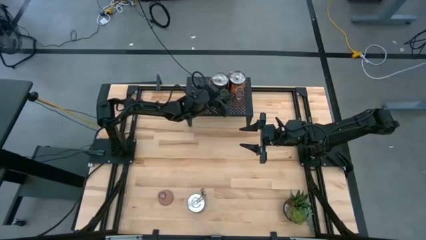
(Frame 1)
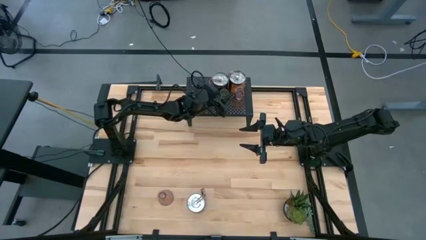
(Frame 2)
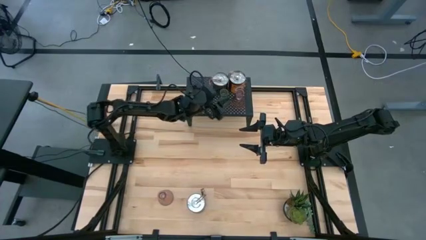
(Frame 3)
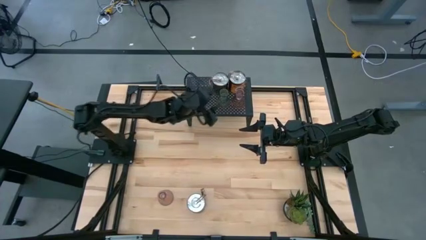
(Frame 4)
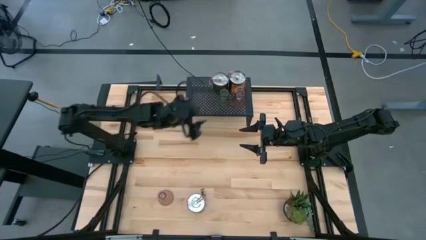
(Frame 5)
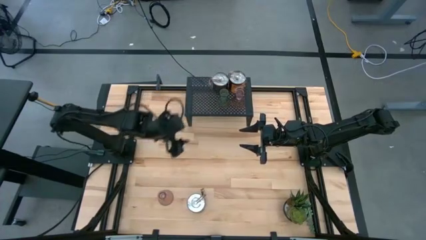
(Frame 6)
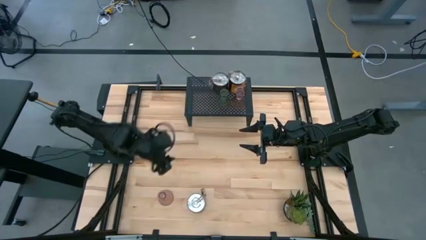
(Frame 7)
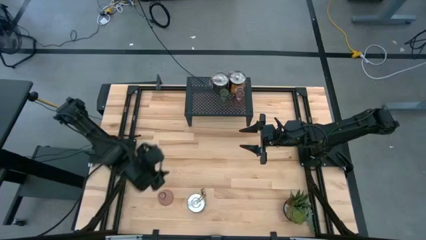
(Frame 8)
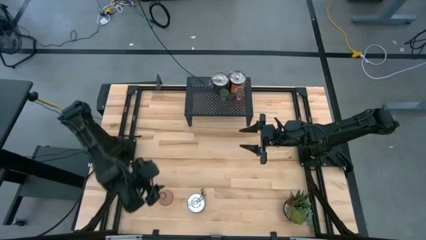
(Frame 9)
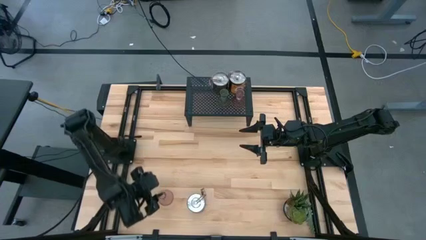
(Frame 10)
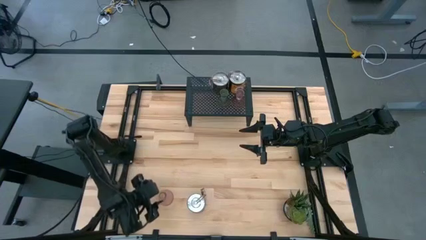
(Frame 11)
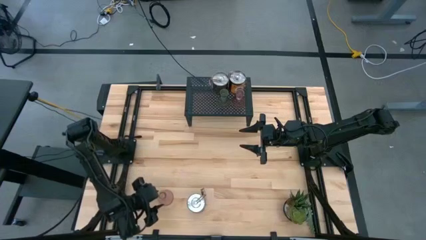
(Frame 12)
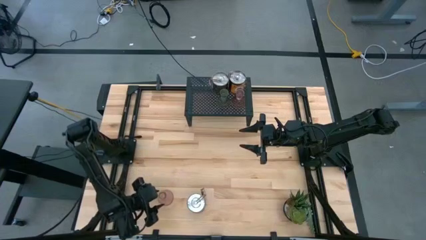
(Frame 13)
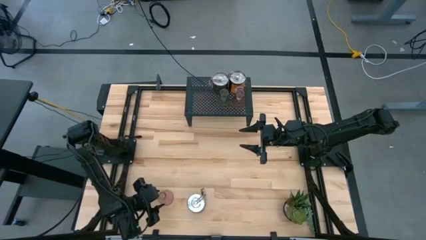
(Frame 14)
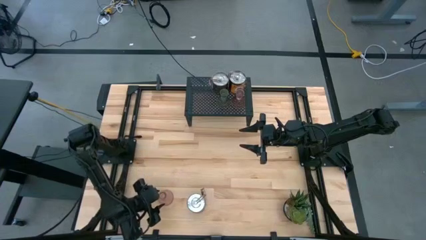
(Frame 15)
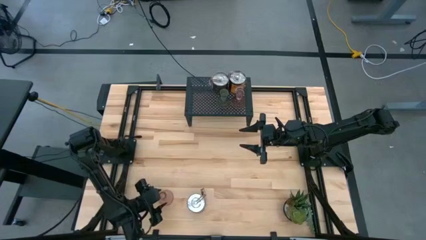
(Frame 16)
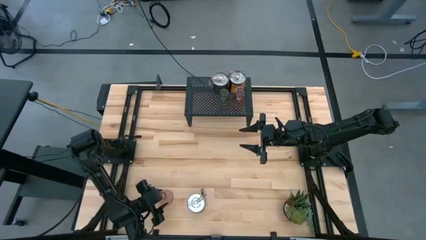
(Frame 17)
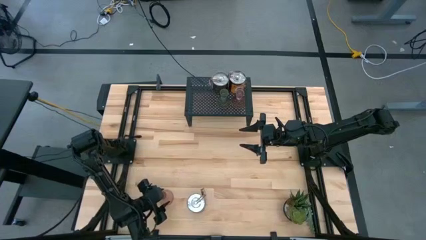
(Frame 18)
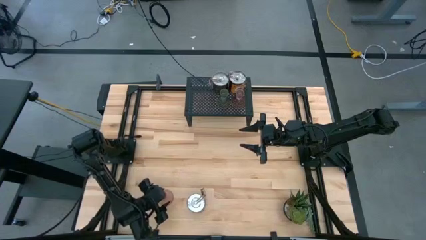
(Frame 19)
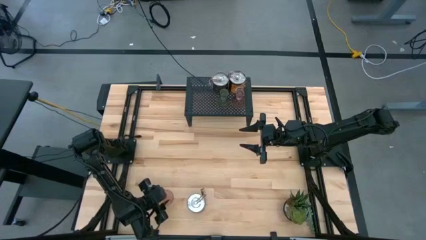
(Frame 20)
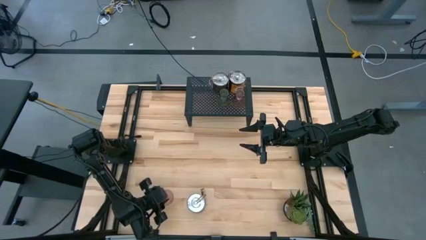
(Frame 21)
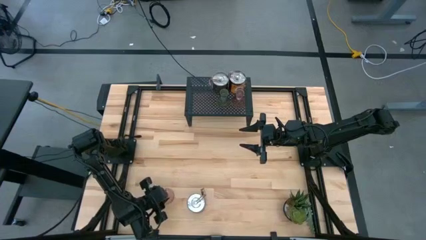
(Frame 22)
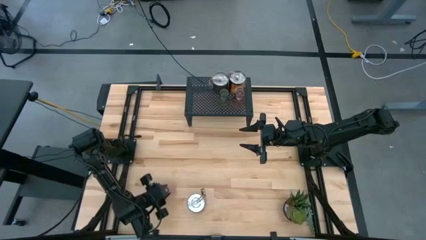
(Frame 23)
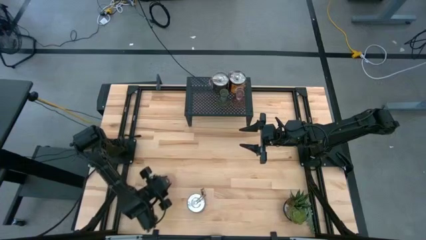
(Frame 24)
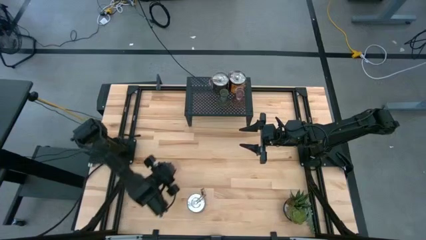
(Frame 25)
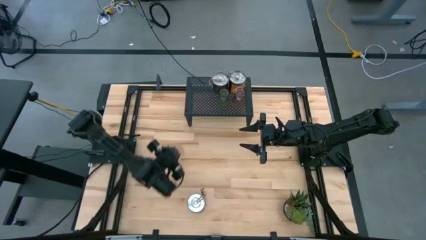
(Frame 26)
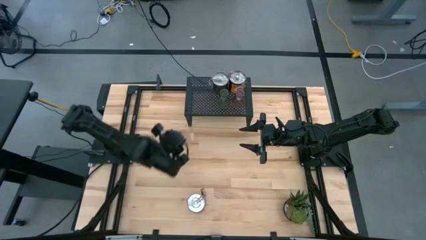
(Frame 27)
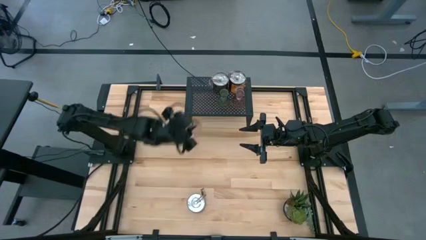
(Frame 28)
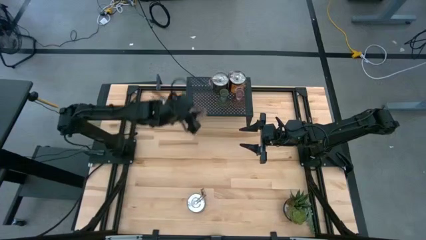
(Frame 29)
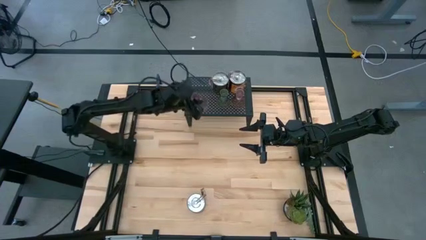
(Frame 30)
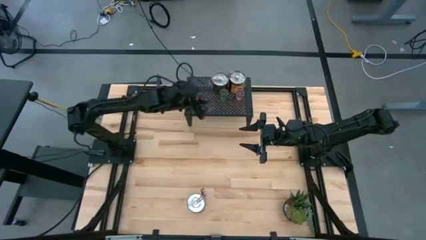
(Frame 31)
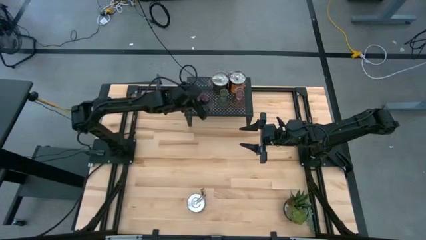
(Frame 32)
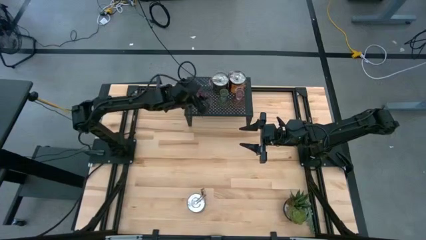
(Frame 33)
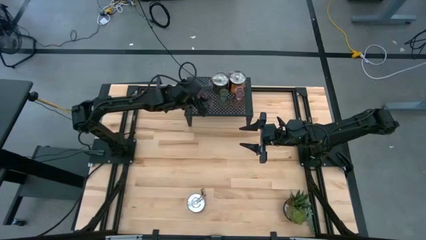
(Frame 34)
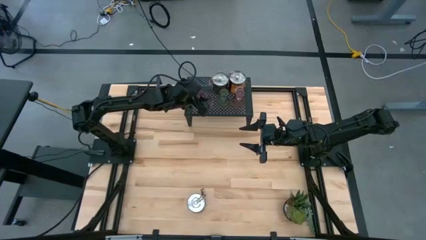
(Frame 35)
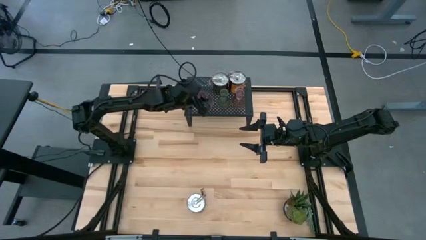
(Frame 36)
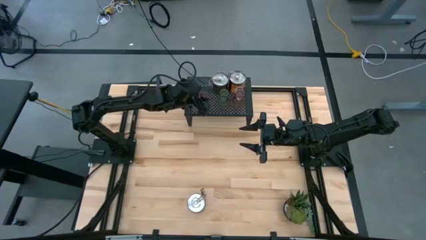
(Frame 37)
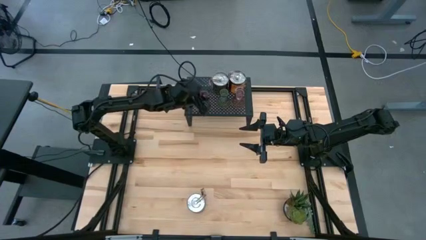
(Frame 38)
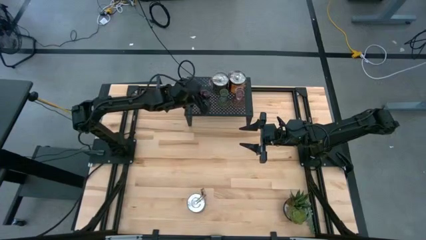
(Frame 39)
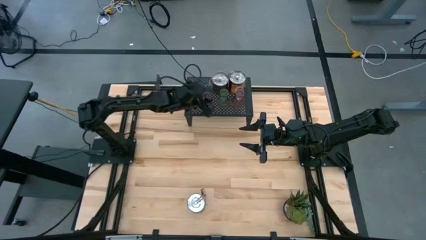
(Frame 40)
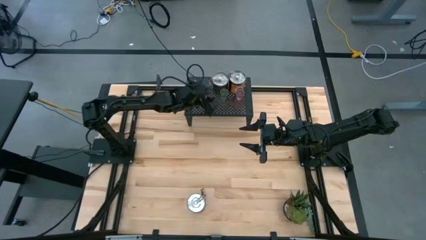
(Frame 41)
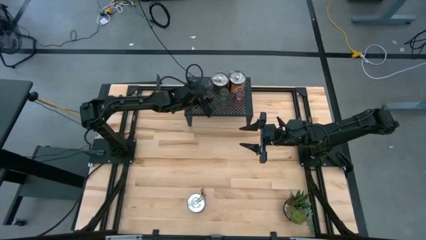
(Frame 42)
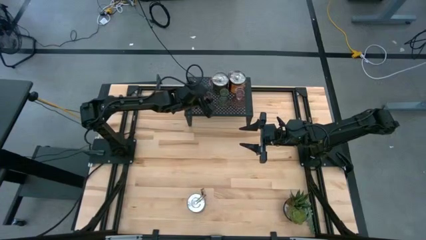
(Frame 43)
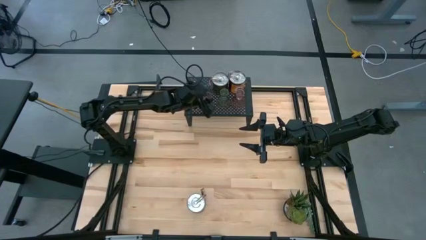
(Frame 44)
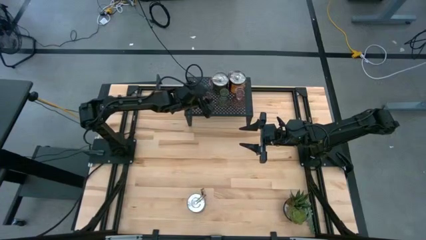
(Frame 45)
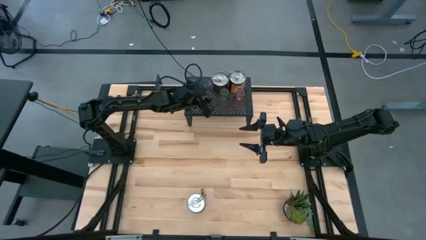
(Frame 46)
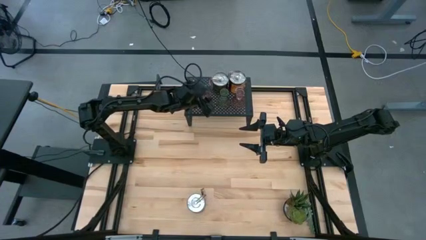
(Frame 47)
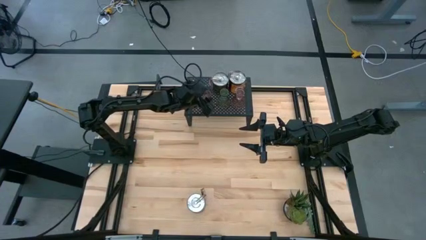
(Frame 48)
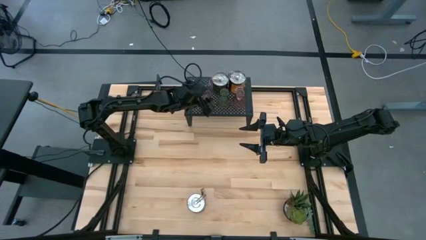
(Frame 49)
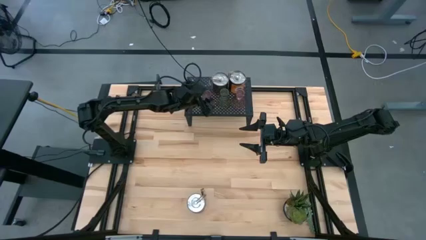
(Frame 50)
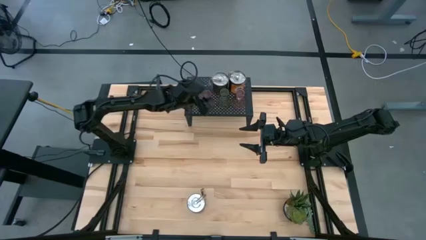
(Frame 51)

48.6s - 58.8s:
Task: Pick & Place candle stick holders
Put the pink candle holder on the shelf aligned with the other candle holders
